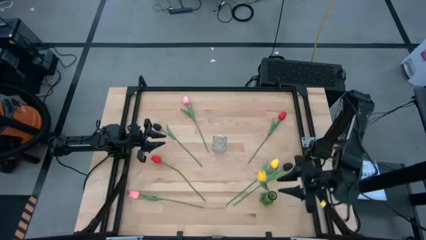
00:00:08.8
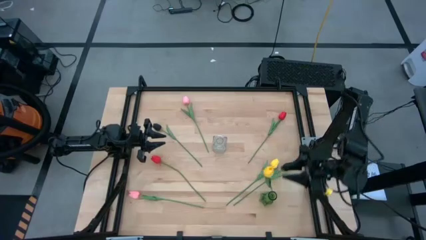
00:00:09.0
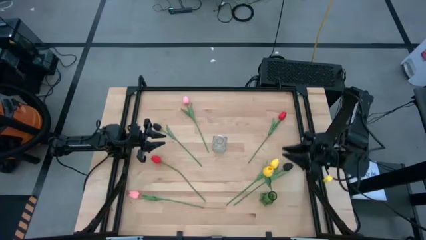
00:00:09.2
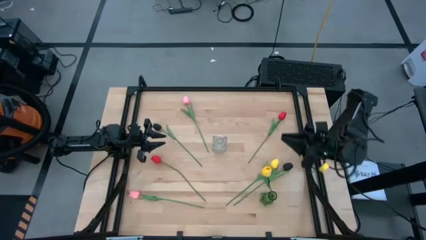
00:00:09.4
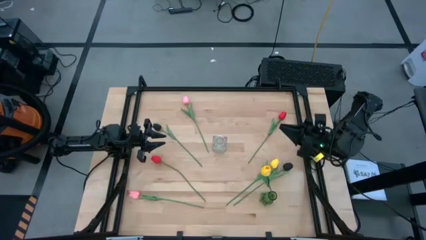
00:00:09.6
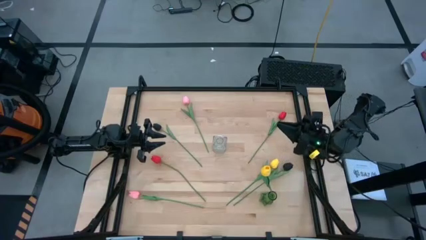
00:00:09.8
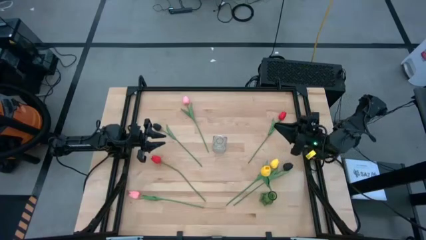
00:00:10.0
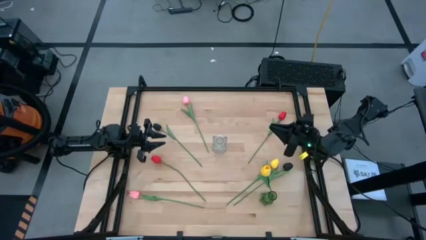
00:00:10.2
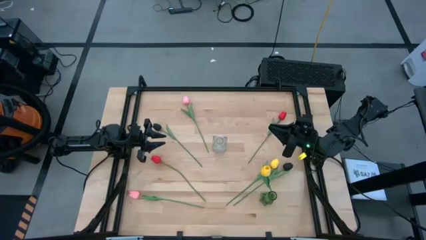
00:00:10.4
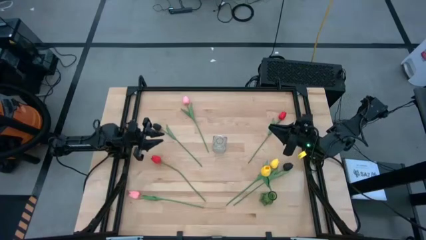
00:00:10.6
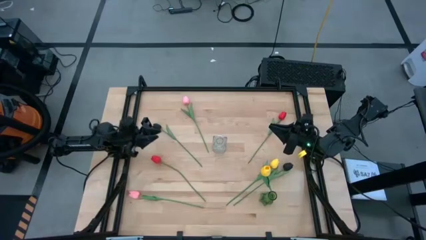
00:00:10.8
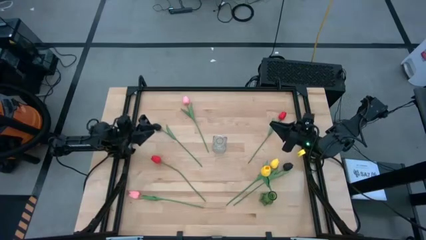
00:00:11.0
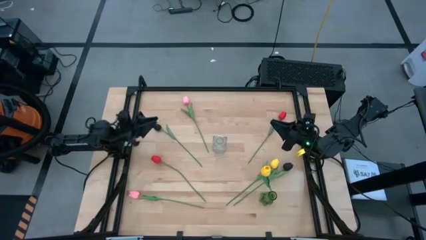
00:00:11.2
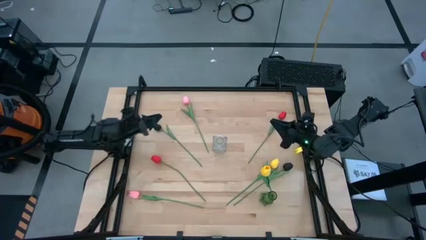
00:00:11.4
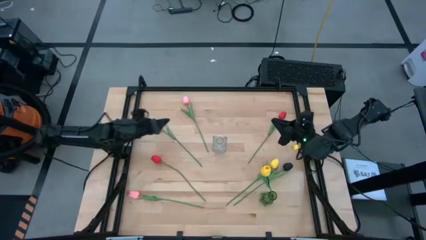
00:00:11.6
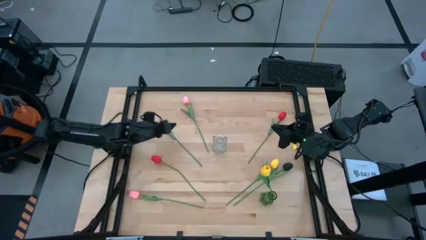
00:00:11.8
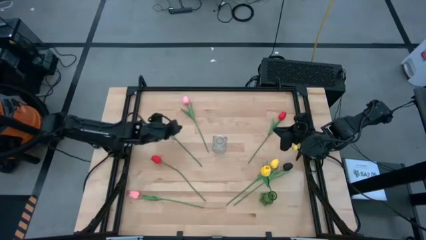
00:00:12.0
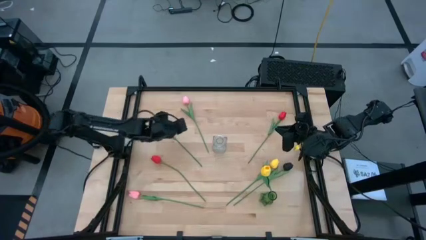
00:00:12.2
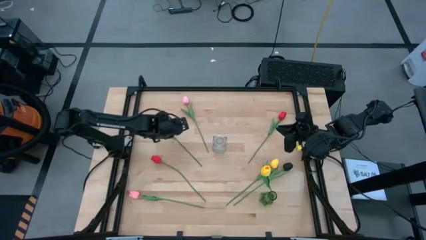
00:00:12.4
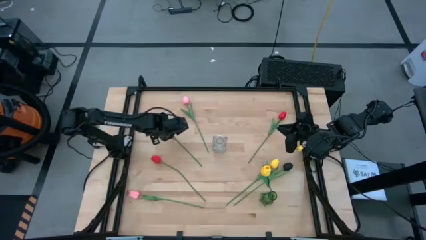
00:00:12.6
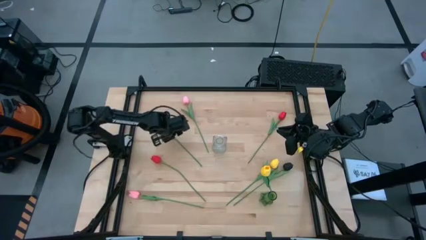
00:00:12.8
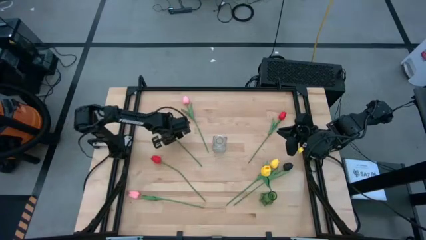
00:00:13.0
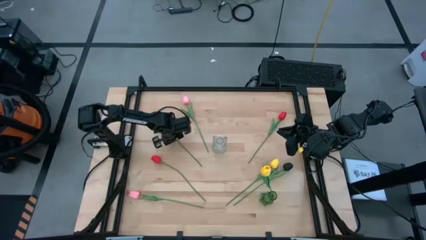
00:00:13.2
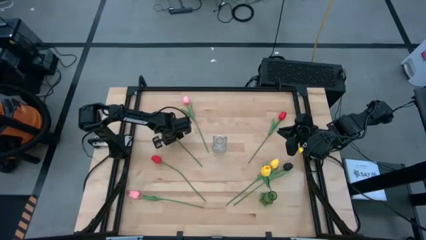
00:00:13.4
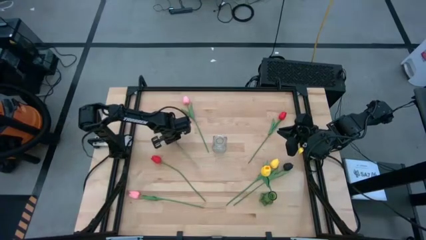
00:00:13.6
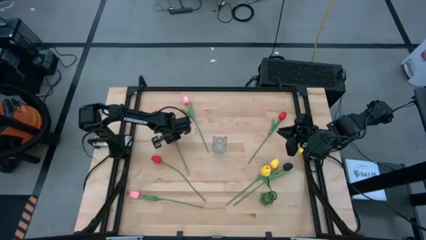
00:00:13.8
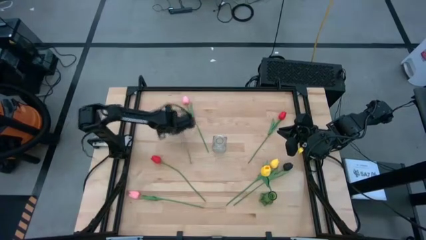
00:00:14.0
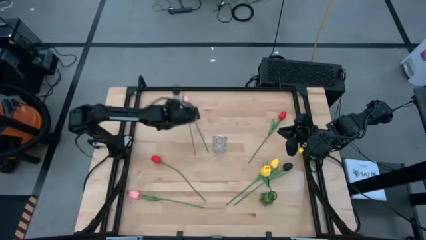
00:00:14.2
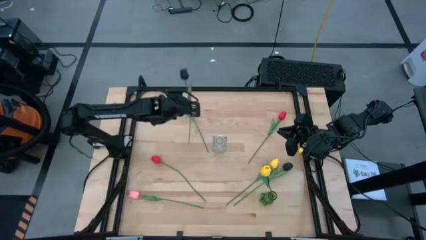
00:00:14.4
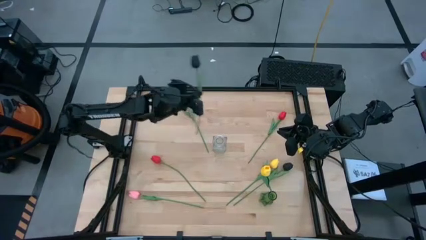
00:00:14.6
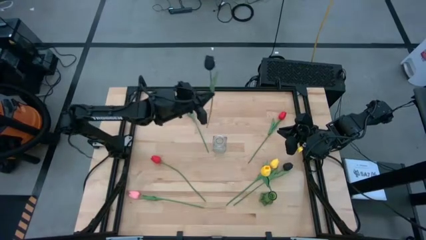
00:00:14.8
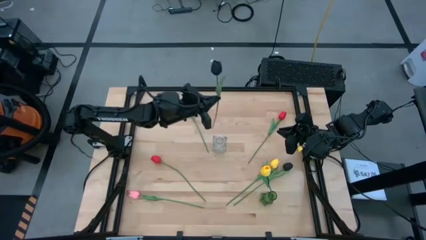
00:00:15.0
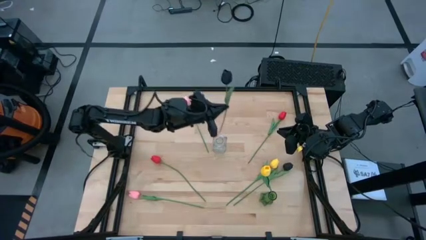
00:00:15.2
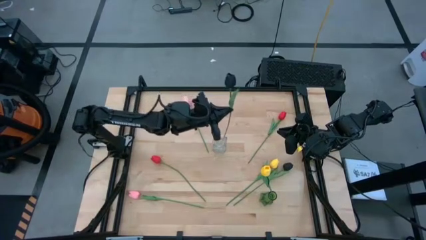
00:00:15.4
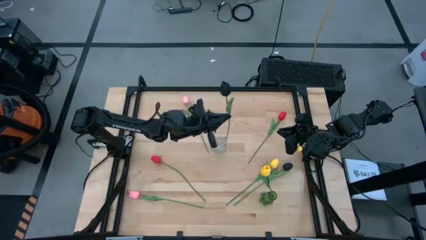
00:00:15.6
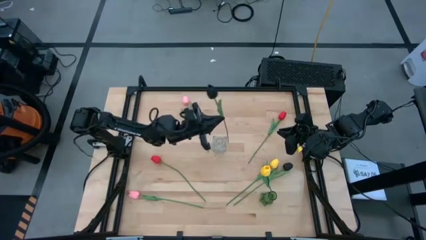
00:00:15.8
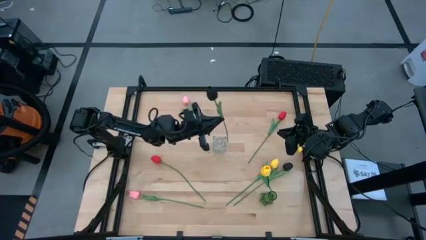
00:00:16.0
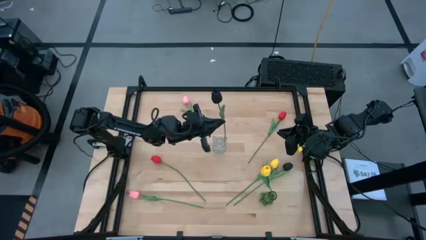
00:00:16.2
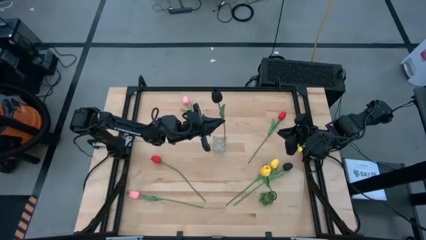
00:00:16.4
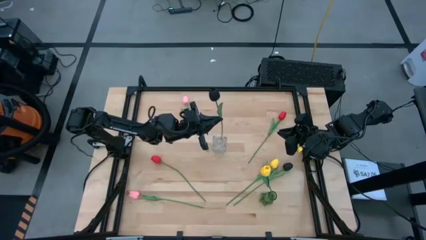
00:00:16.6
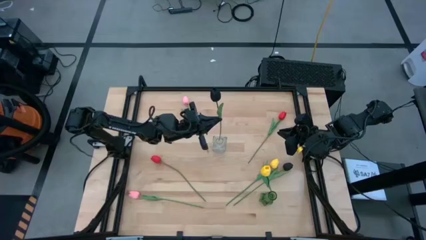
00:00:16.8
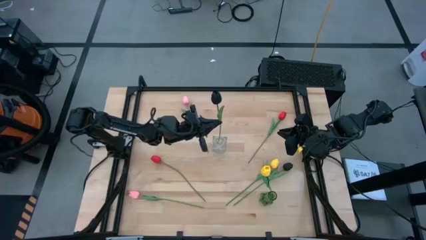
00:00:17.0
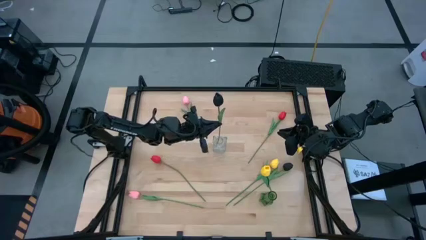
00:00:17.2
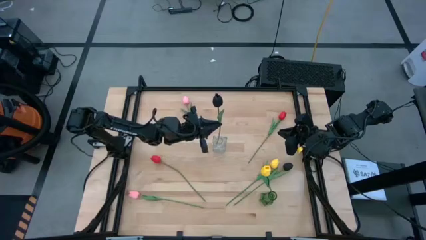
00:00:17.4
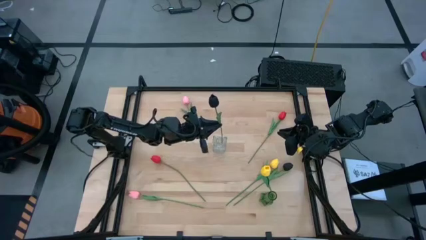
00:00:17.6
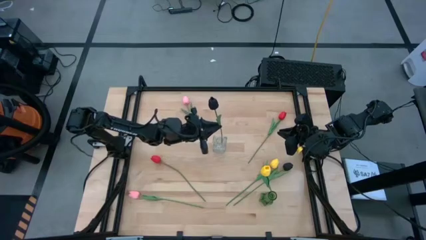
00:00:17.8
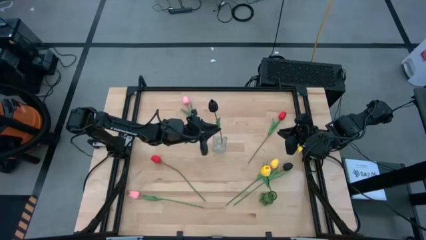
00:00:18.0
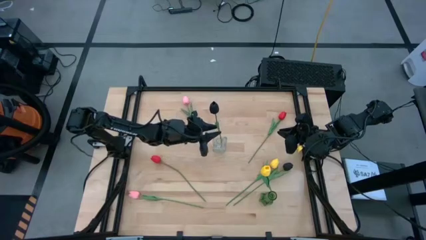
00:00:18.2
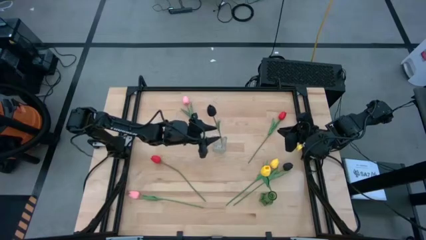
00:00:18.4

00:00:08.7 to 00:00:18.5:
Task: Sort flowers into vase by color
Put the top black flower into the transparent vase

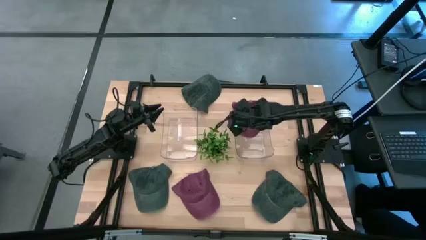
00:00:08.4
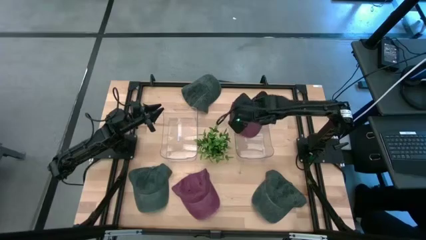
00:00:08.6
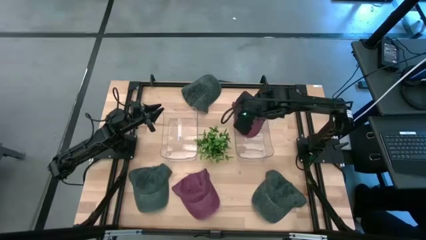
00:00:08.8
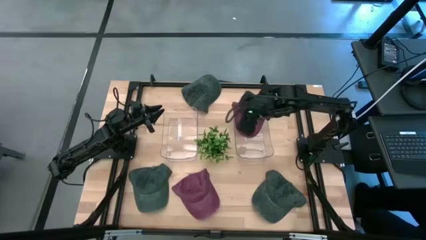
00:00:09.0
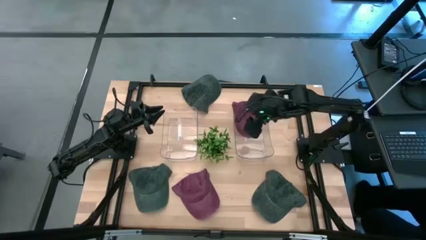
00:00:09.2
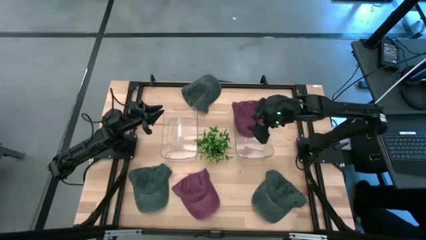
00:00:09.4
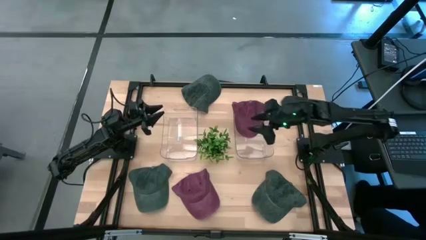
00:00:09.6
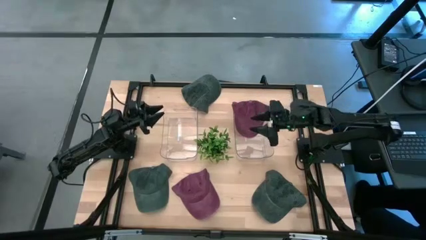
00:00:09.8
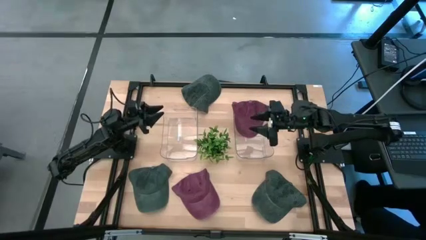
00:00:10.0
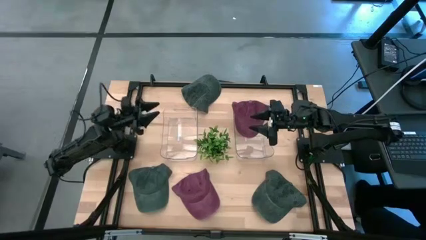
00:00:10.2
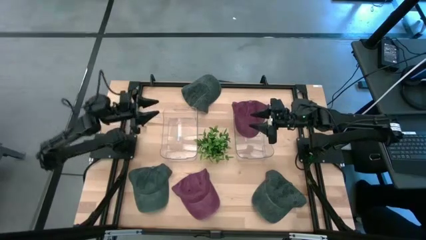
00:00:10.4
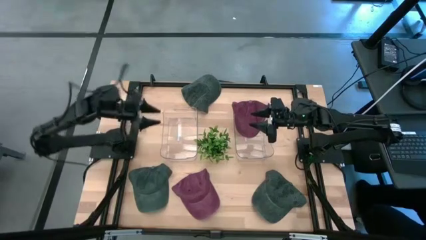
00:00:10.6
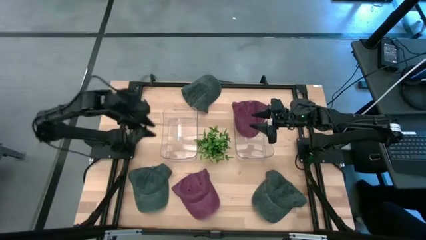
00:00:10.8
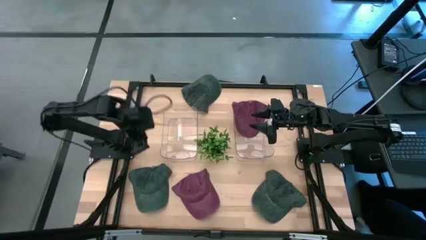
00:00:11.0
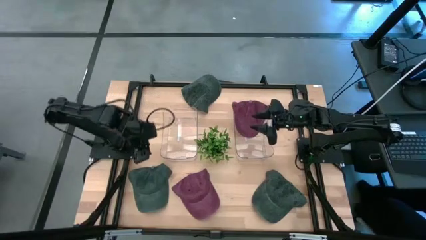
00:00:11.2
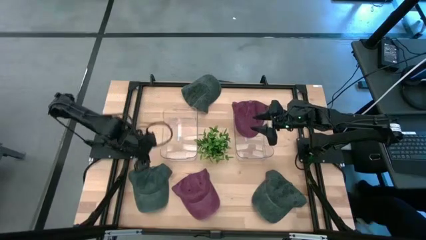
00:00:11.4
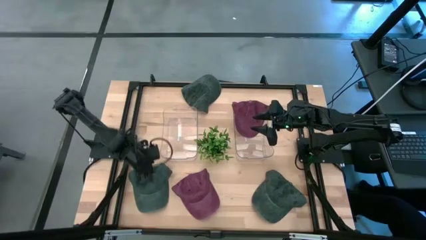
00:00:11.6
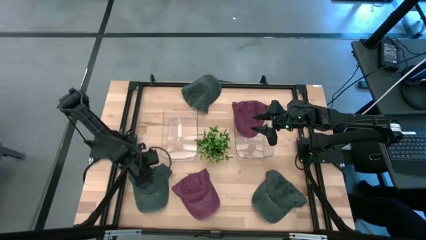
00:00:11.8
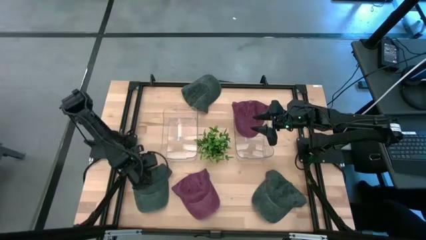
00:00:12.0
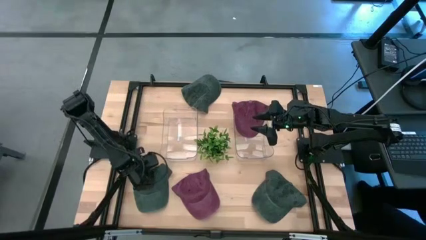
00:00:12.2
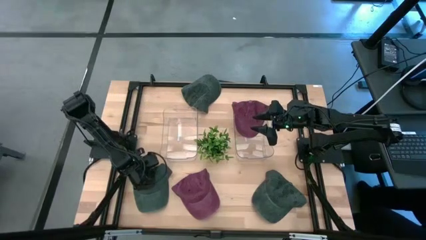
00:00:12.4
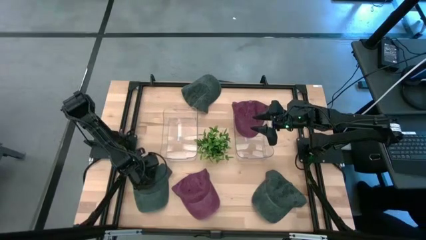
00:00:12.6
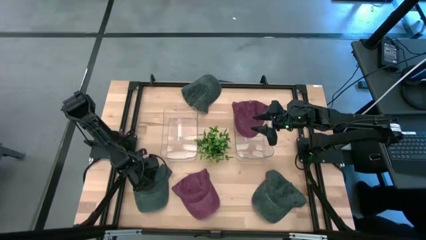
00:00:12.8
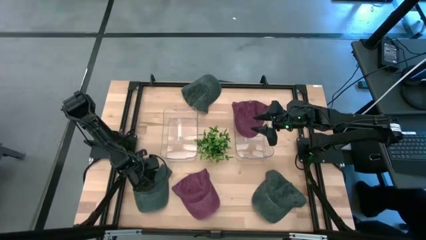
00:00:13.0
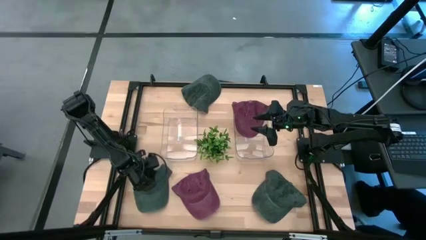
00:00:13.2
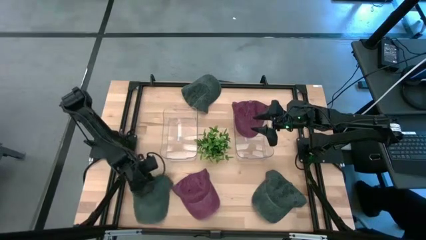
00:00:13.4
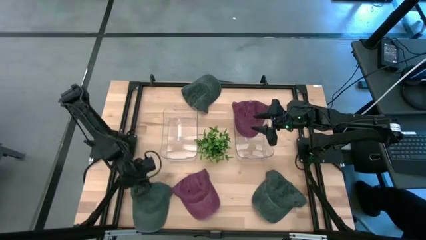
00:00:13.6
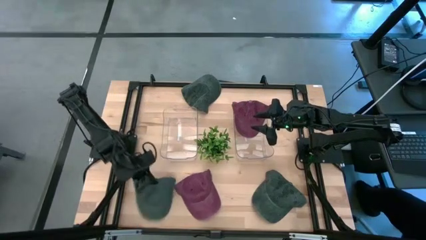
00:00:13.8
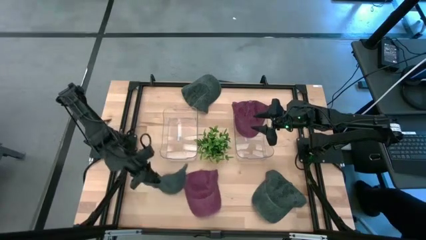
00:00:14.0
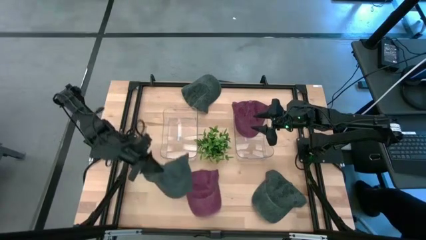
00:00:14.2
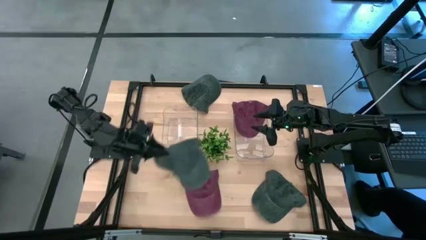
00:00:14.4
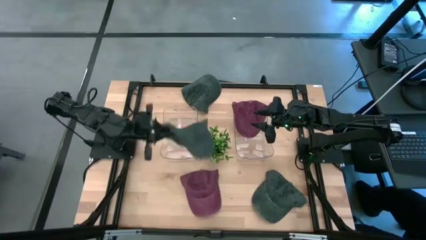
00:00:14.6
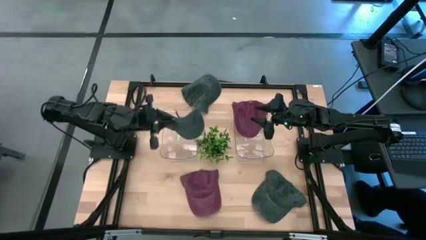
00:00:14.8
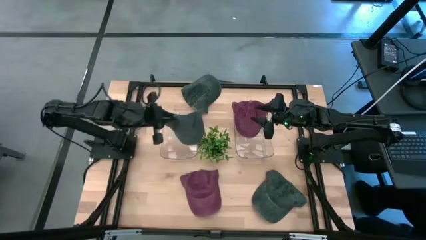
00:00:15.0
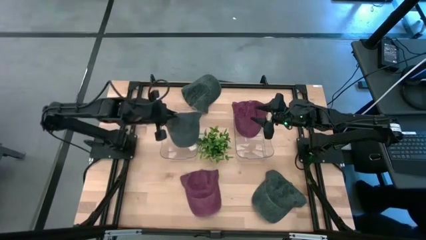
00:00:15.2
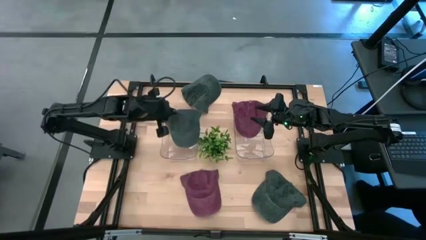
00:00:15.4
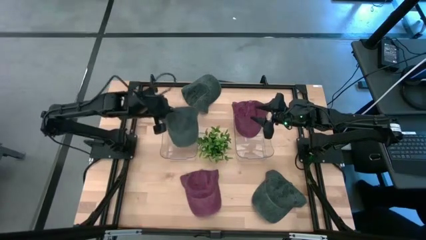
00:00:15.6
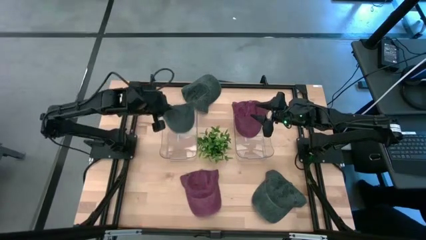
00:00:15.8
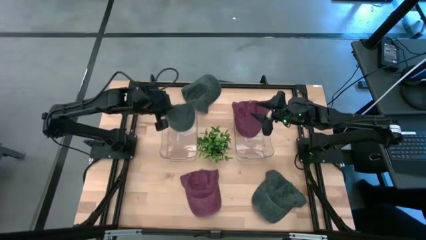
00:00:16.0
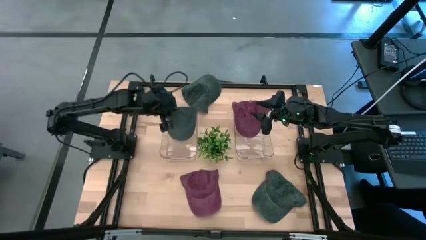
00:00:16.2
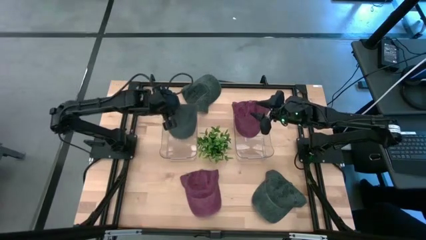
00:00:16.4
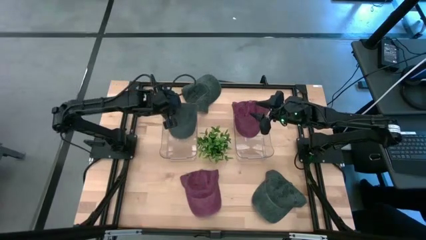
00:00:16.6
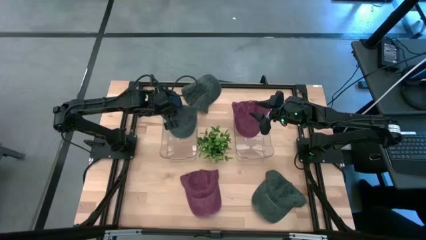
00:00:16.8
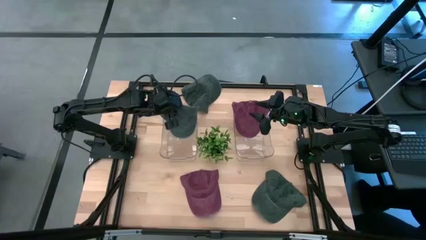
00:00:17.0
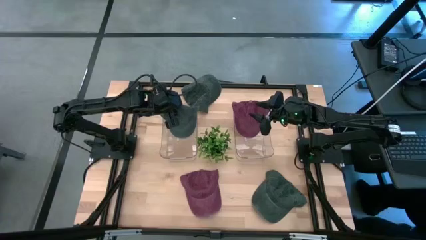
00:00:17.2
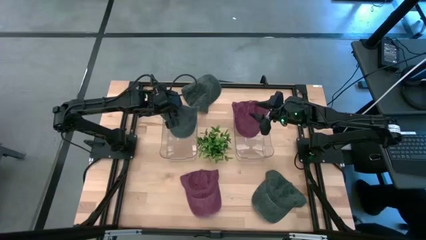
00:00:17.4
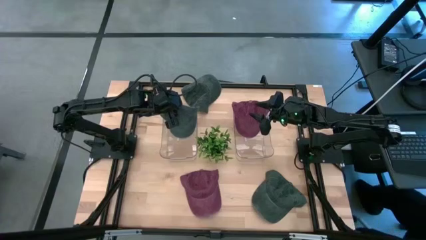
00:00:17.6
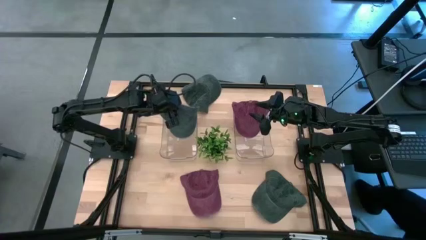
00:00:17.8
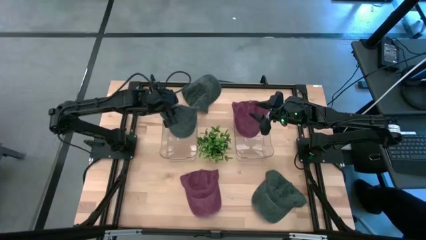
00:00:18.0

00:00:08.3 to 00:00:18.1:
Task: Pick & Place hat
Put the bottom left black cap into the left transparent bin
